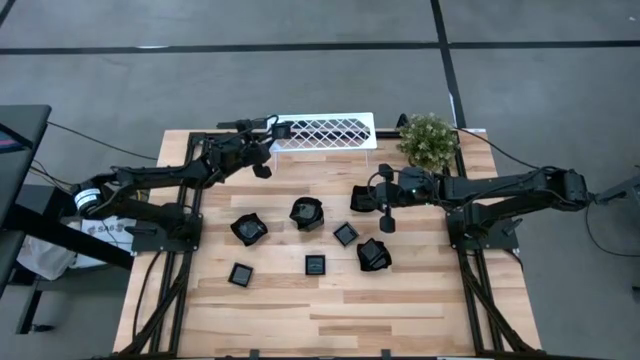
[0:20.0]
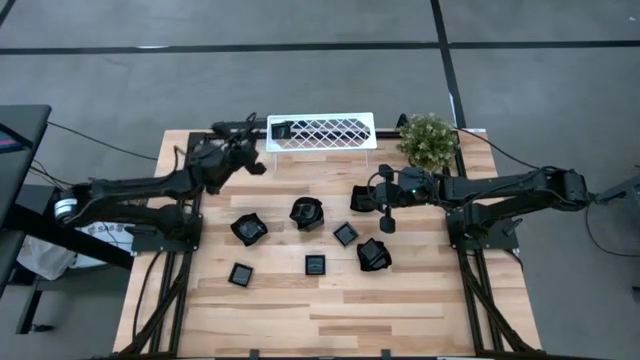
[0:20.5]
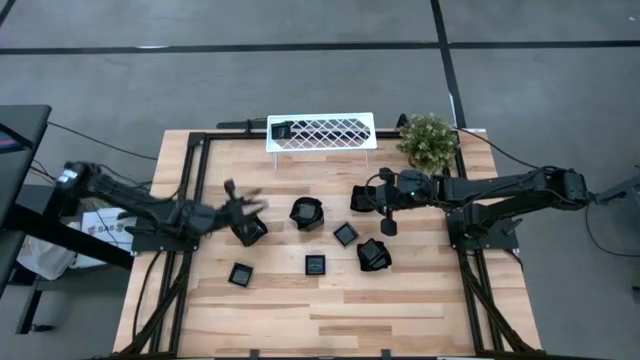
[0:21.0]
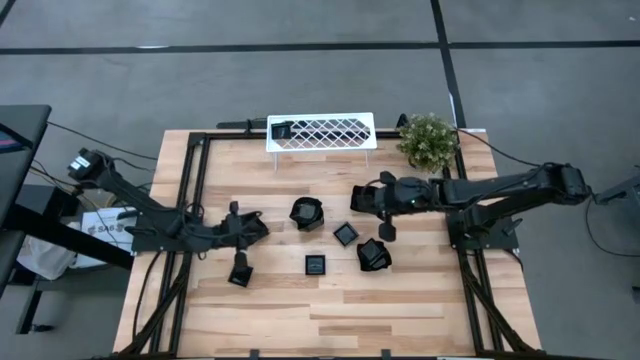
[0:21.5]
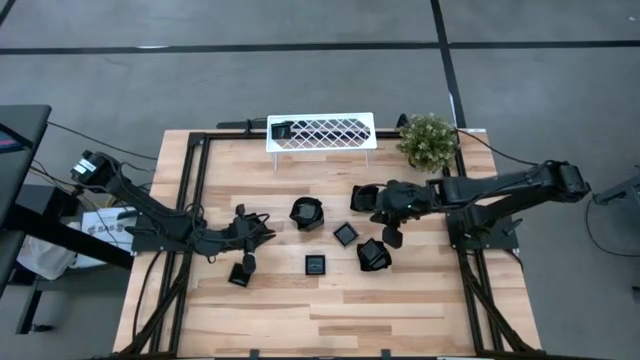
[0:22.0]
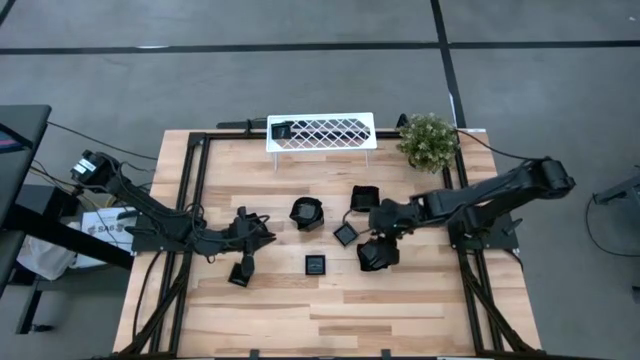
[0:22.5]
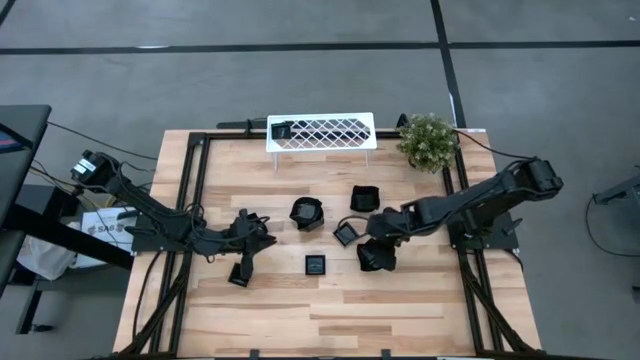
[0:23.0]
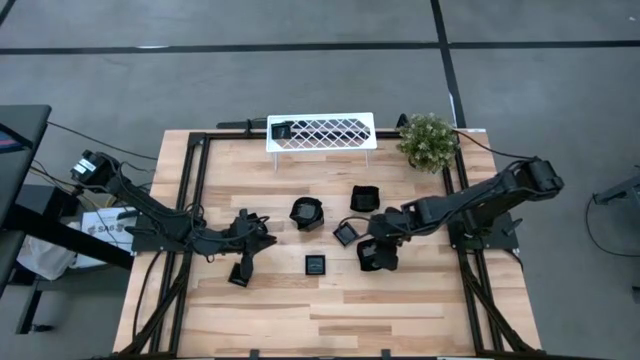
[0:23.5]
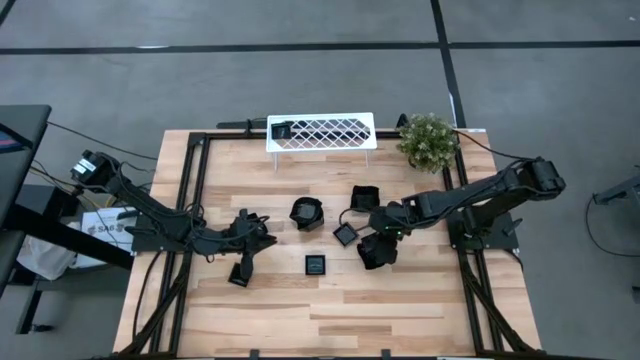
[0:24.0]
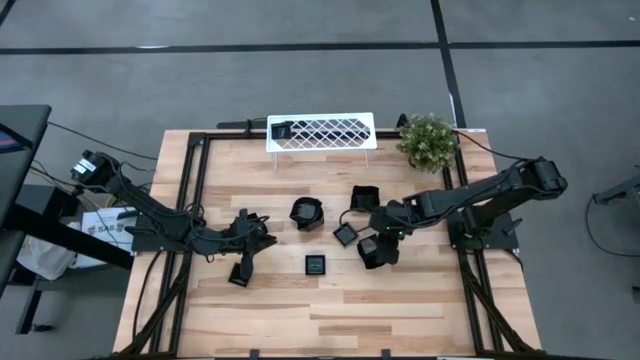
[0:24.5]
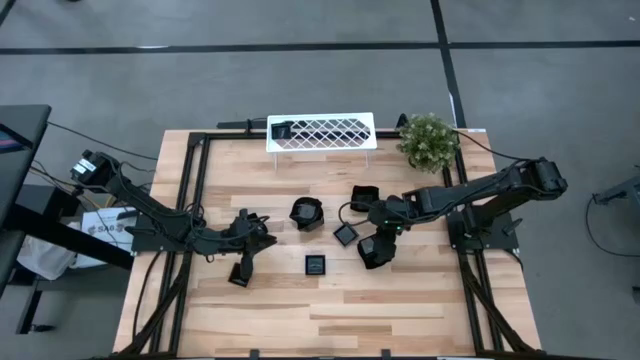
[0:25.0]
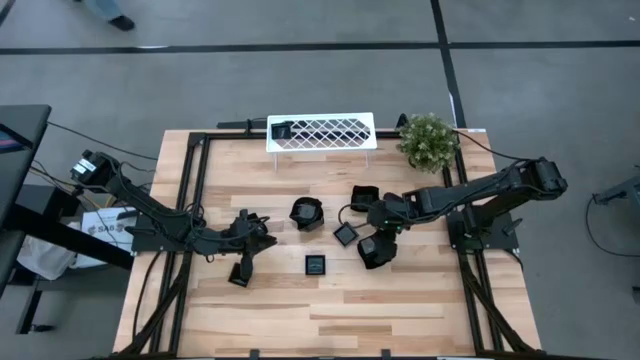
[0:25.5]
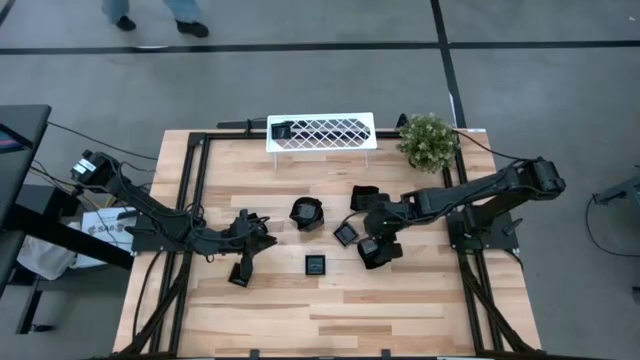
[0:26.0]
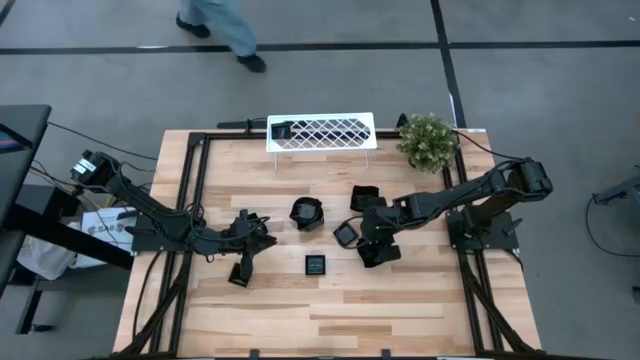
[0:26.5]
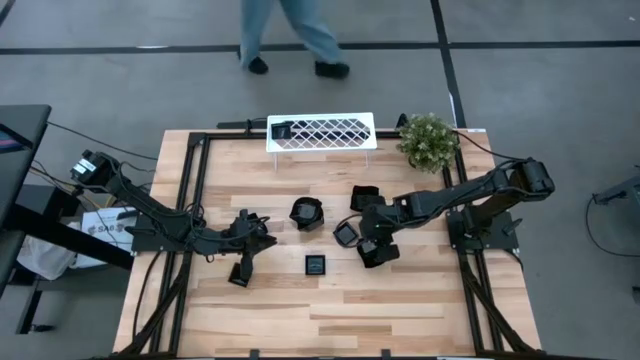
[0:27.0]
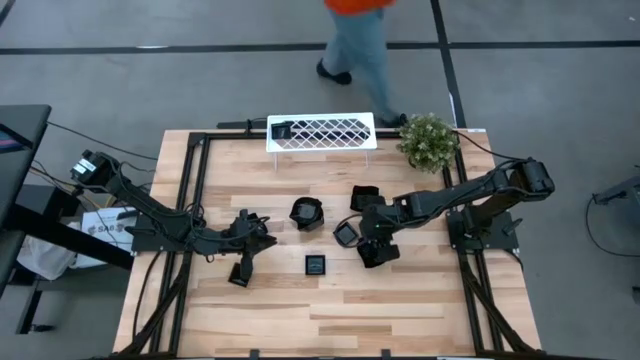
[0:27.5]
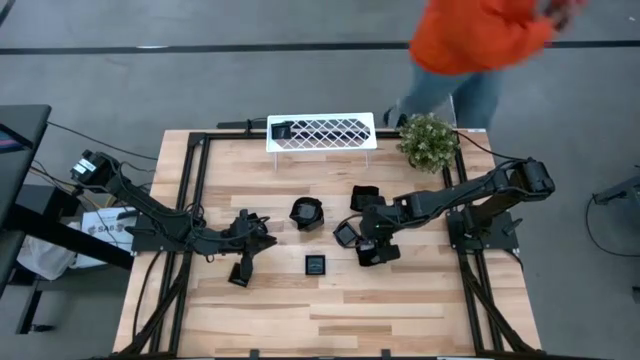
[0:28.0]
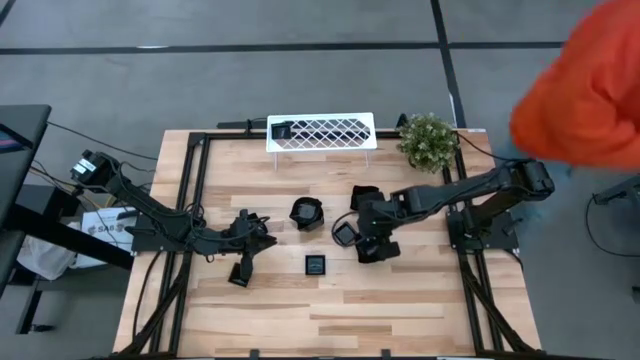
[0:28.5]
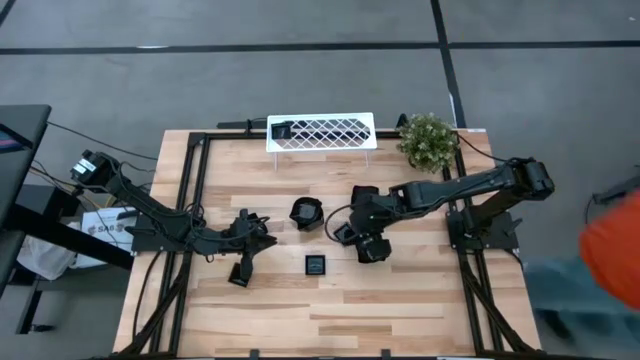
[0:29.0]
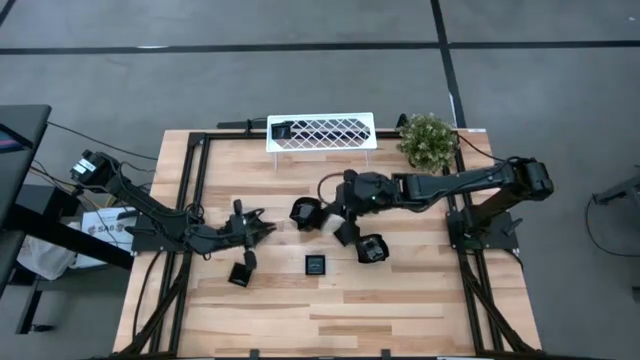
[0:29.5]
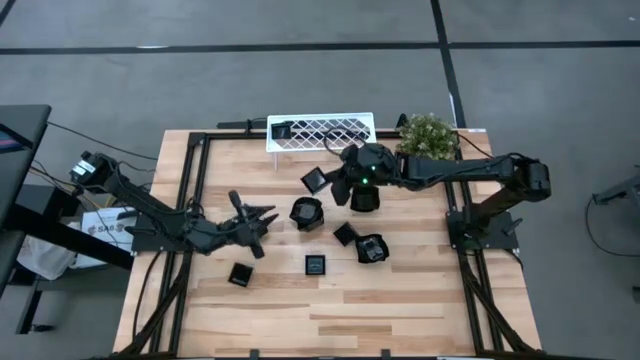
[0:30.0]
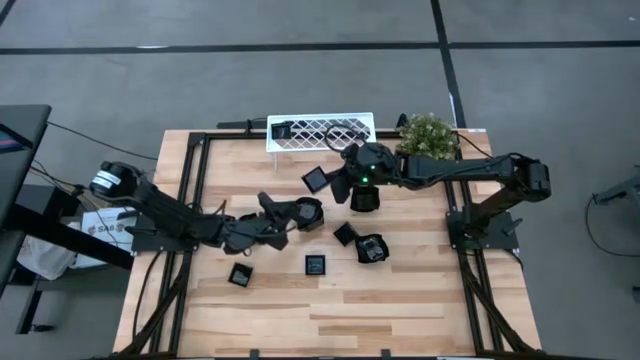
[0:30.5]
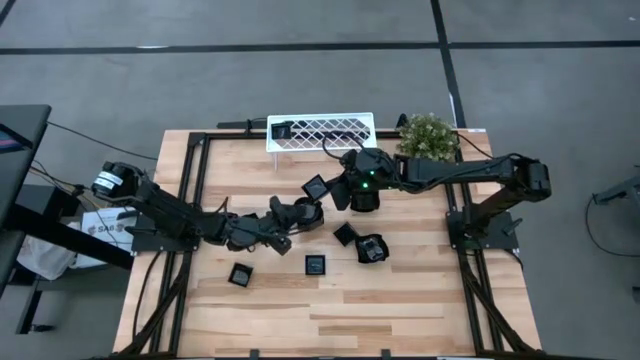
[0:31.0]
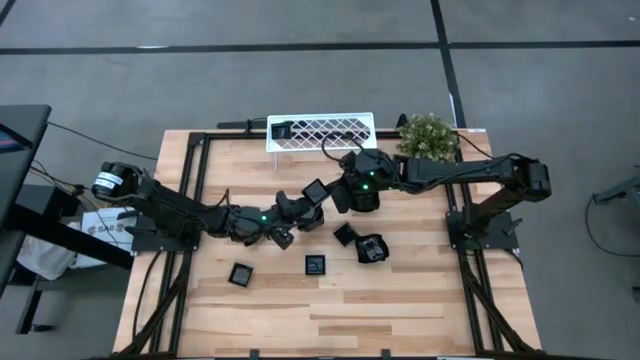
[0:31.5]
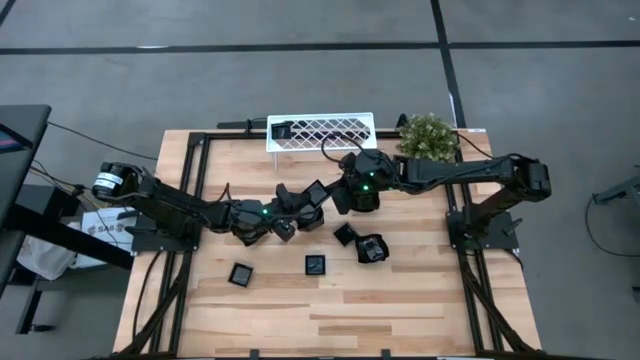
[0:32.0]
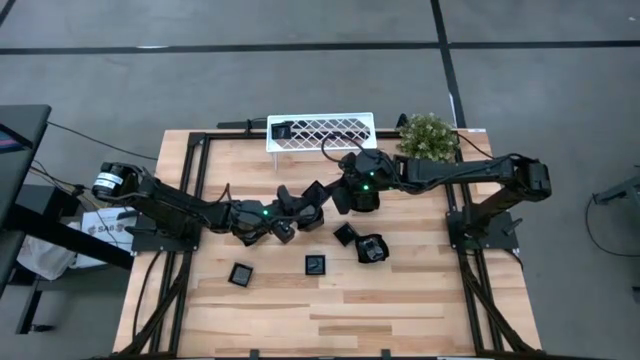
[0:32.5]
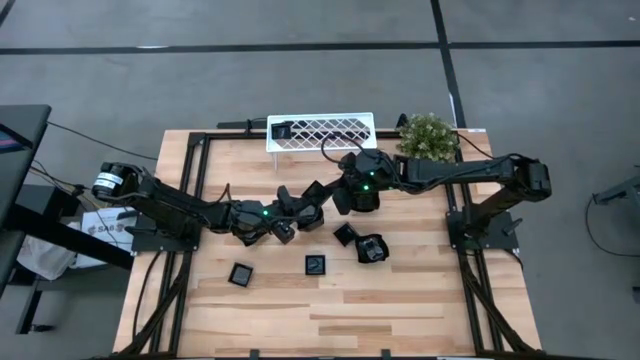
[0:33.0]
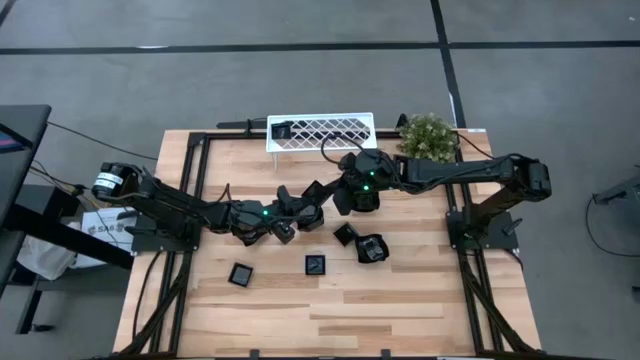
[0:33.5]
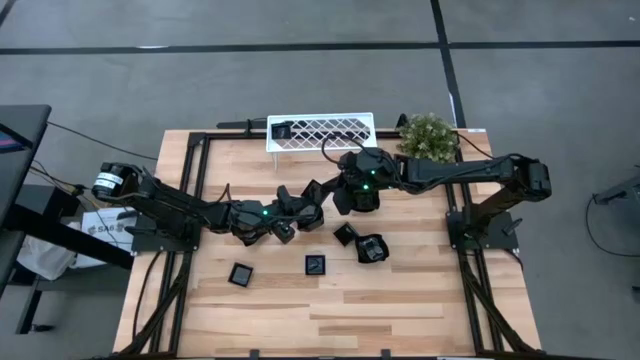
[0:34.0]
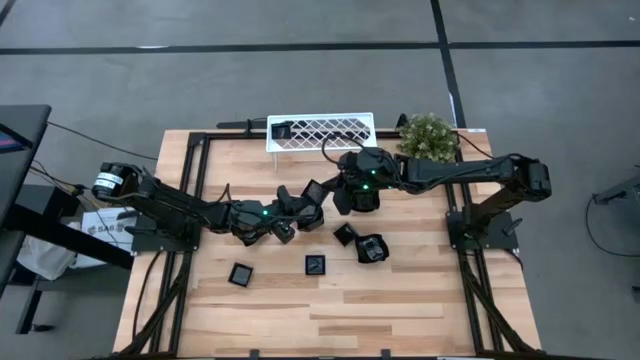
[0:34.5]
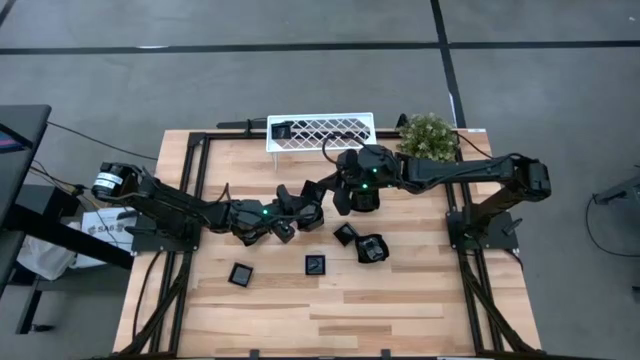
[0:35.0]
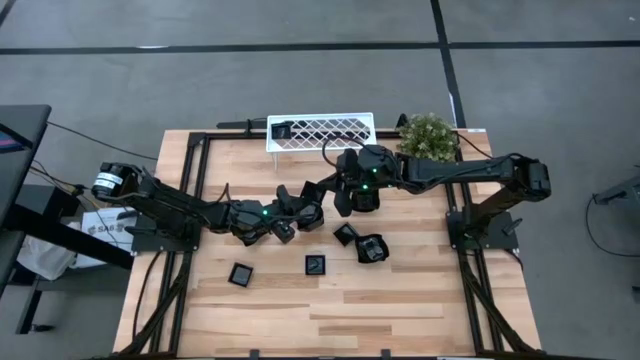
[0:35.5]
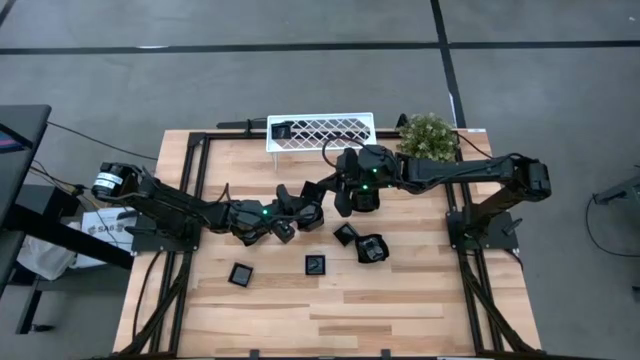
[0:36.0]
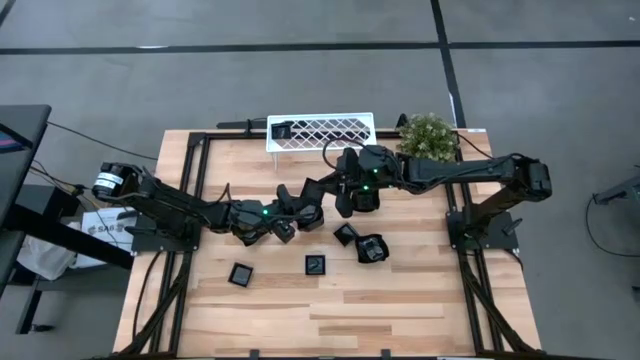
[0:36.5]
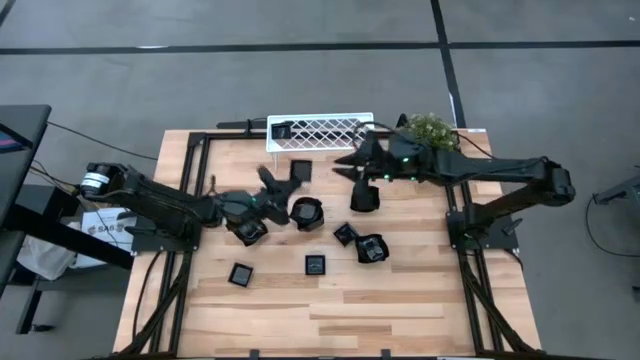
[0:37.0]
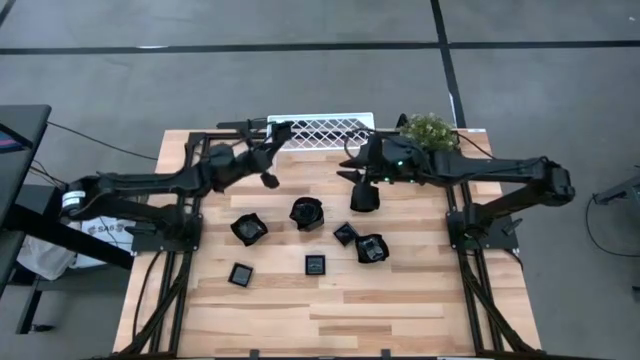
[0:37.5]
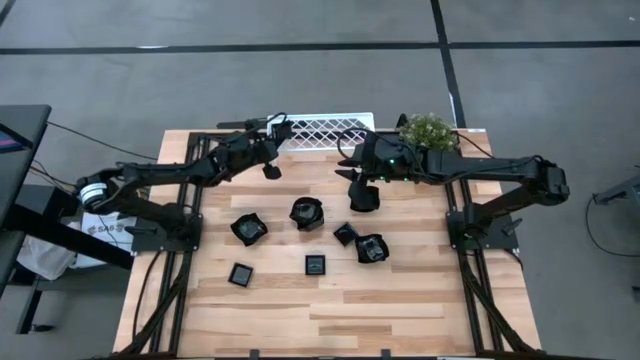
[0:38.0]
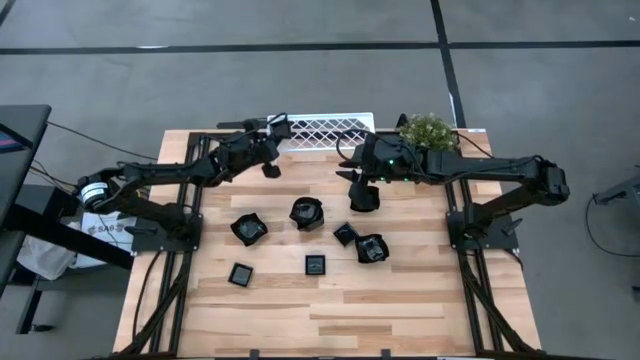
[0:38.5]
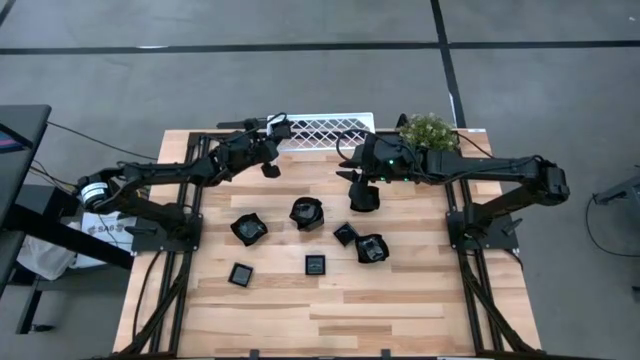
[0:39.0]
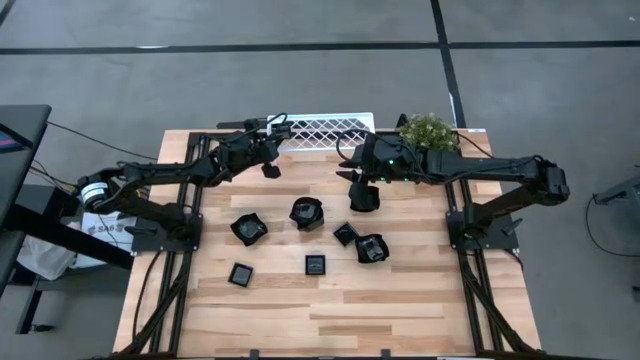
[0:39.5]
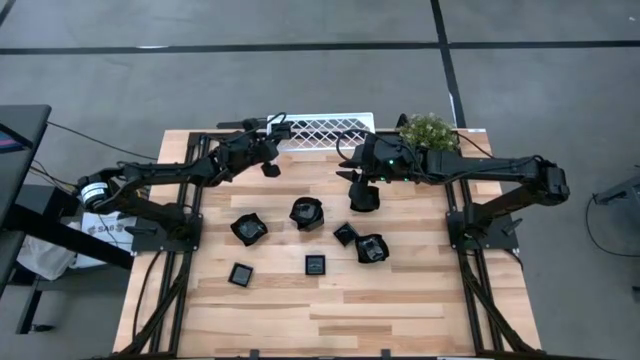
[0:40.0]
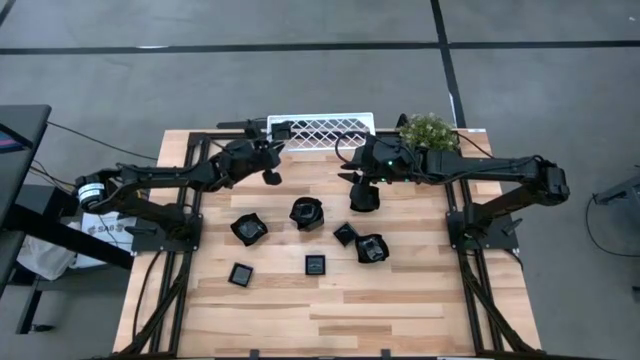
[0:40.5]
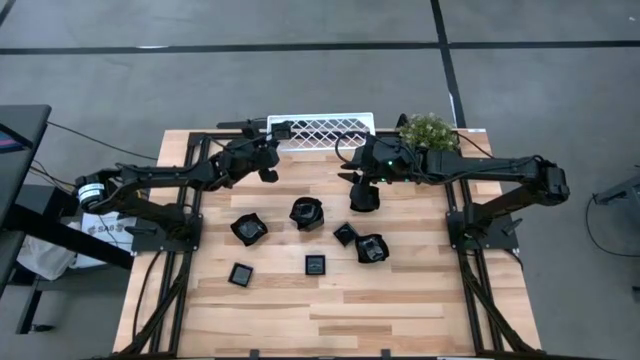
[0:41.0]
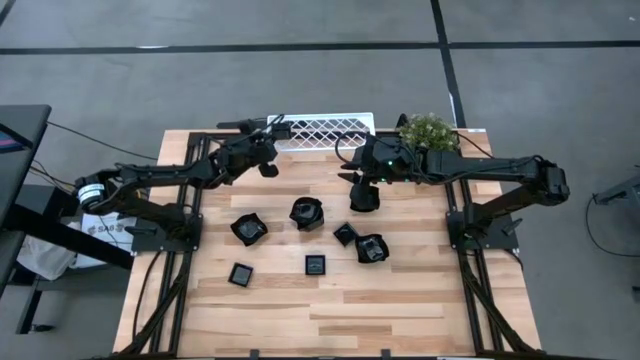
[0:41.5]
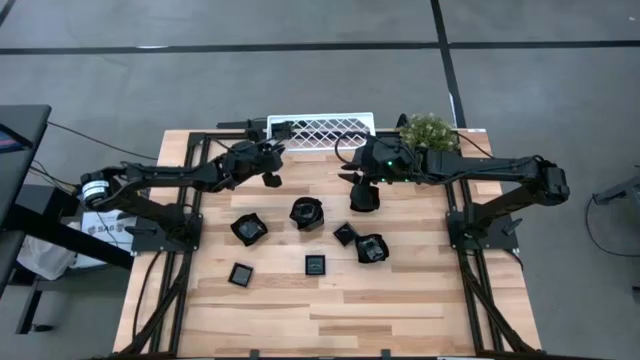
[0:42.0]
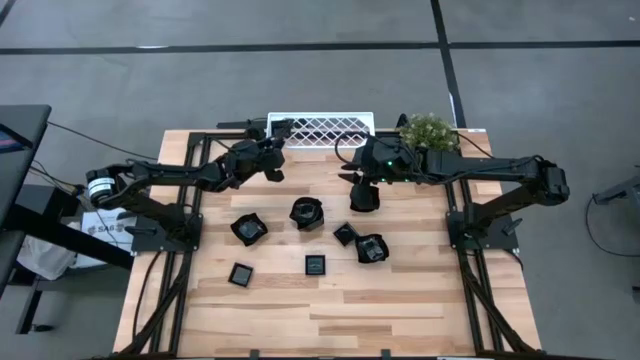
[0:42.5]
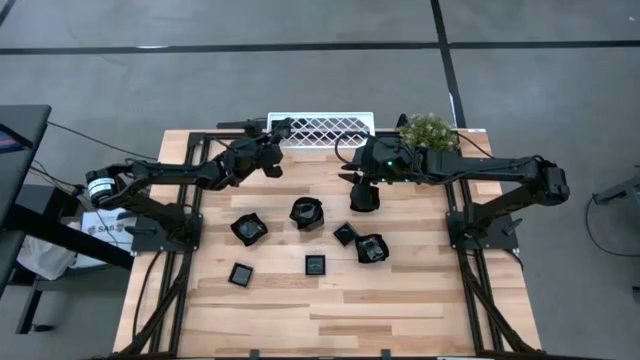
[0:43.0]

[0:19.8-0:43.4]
Task: Pick & Place Mini shaped plates
Stack the black square plate on top of the black square plate on the shelf
